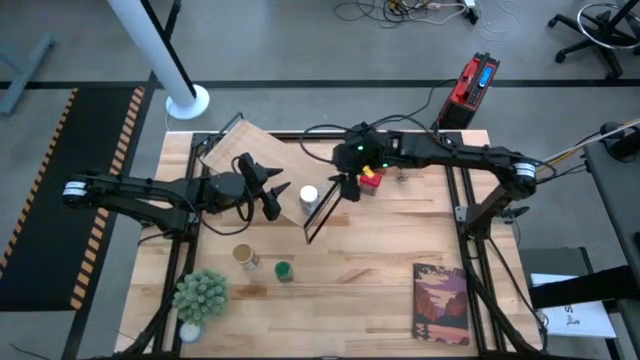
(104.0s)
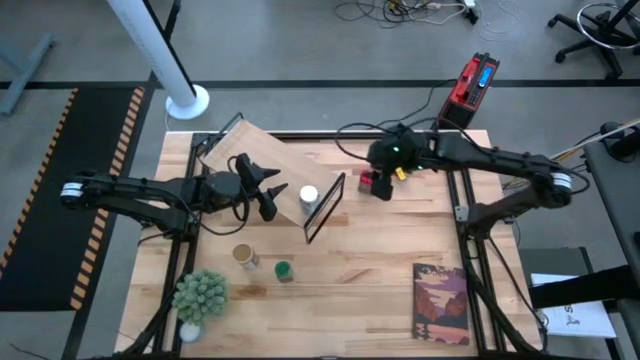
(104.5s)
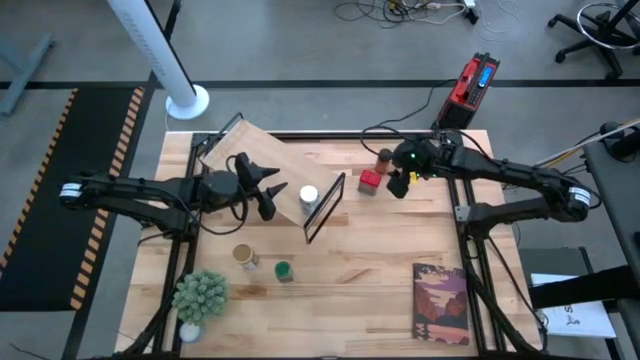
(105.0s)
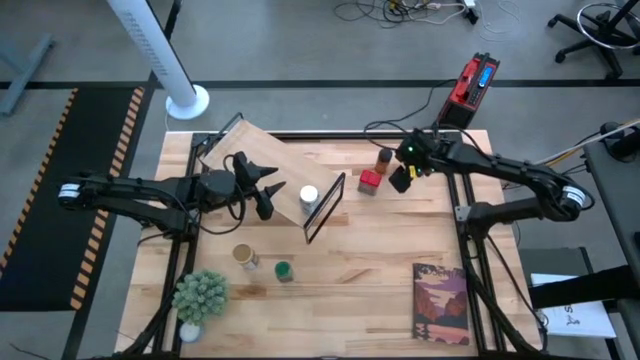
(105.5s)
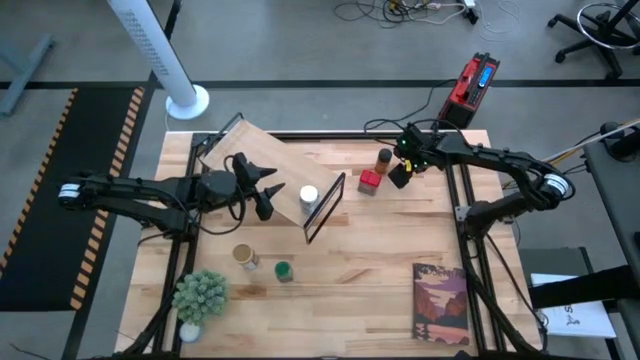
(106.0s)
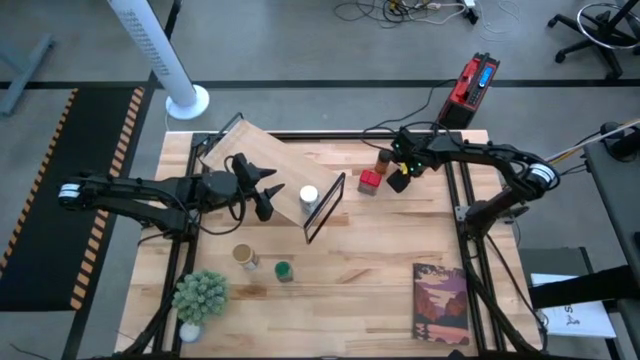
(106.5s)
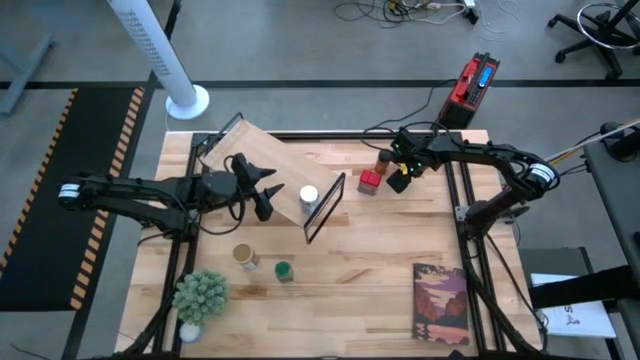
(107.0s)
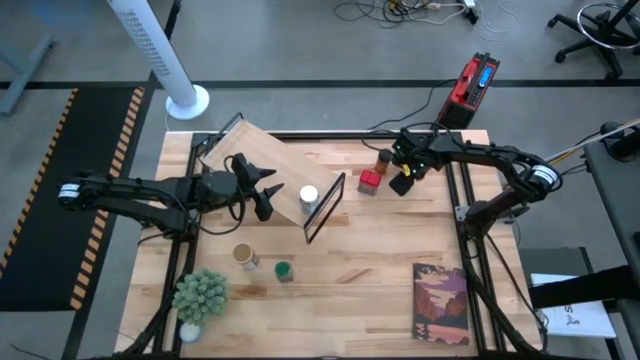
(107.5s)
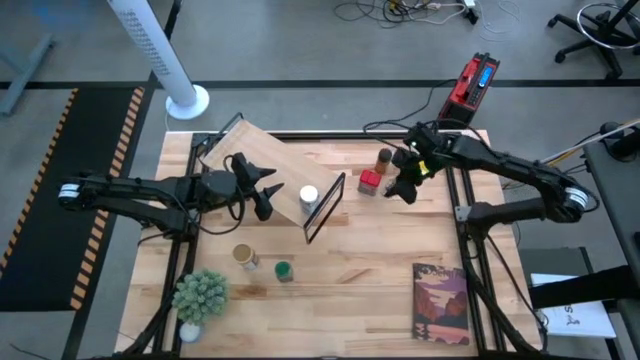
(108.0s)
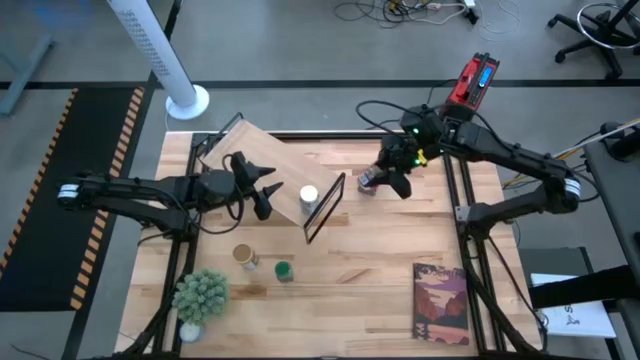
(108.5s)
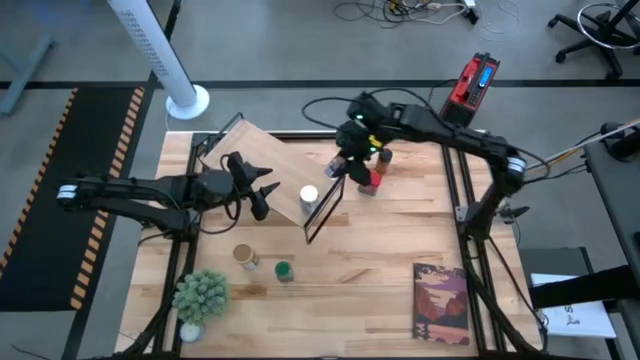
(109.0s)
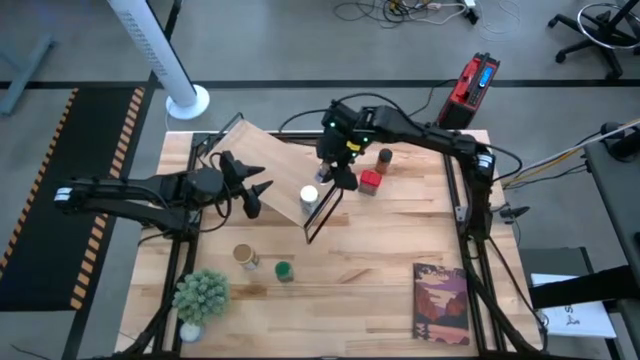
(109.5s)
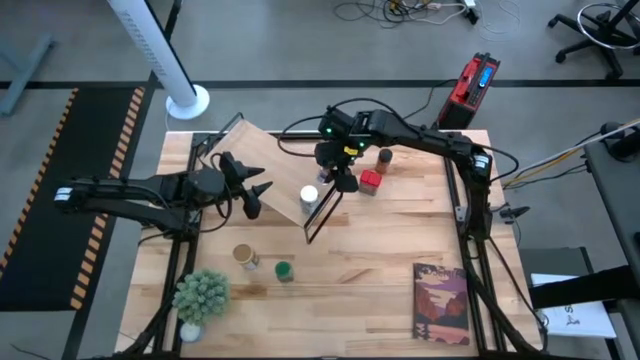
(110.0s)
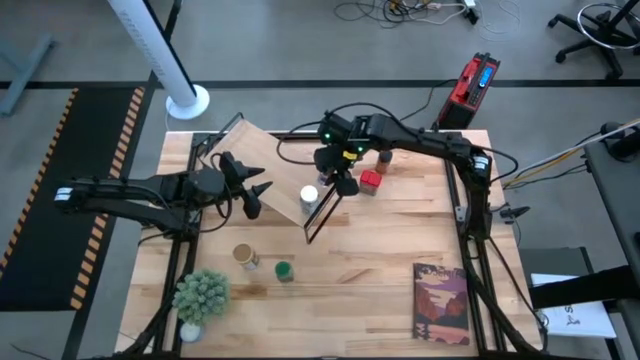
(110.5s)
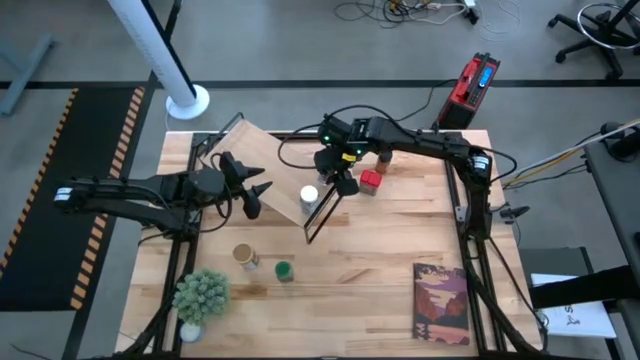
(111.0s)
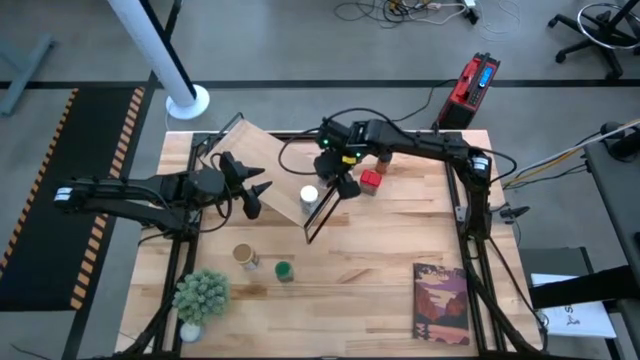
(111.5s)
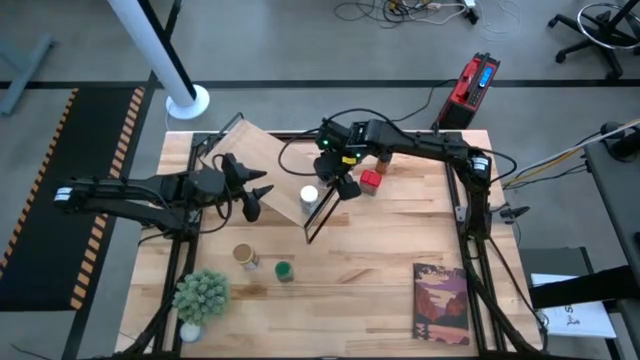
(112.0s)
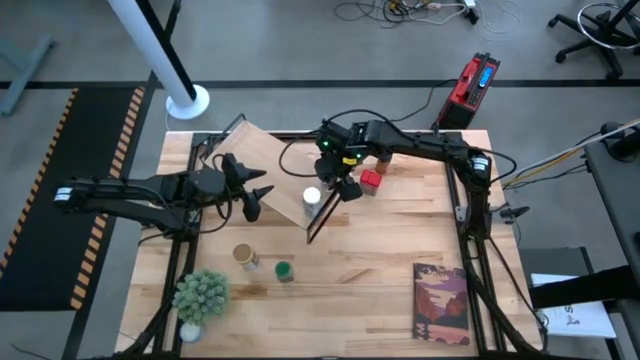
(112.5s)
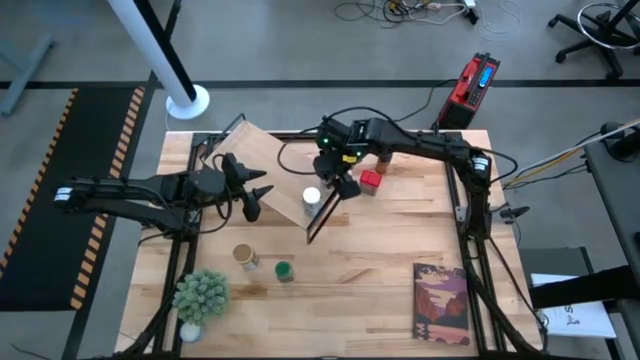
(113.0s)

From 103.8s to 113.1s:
Task: Shelf spices
Put the brown seasoning bottle on the shelf

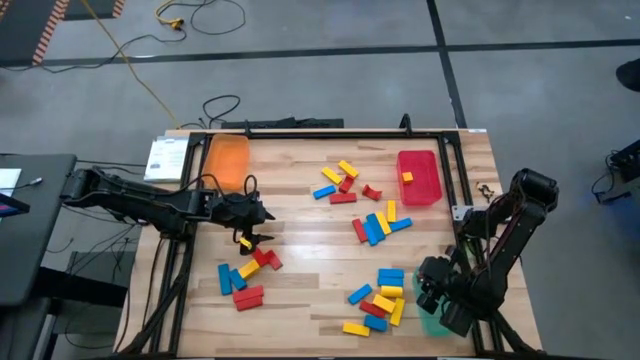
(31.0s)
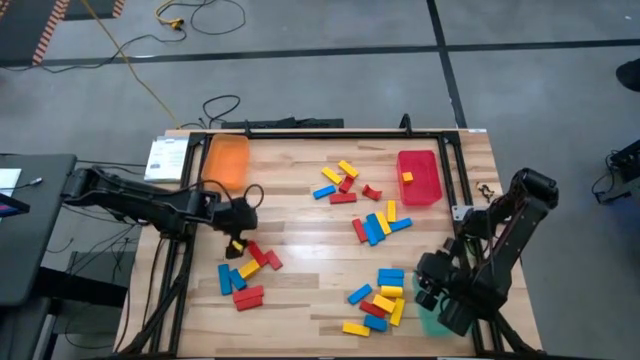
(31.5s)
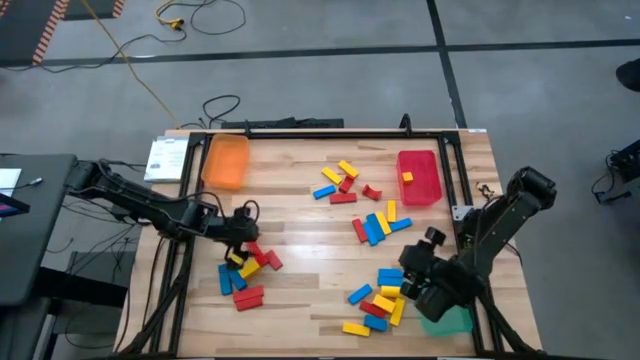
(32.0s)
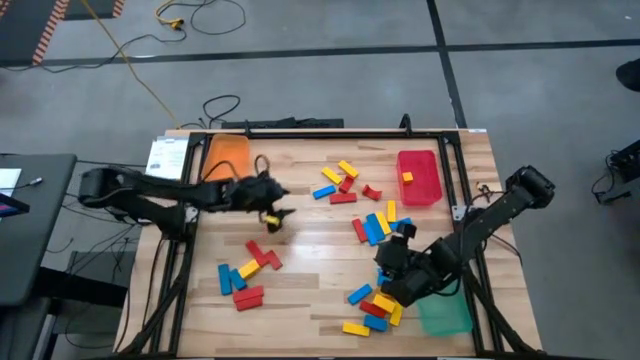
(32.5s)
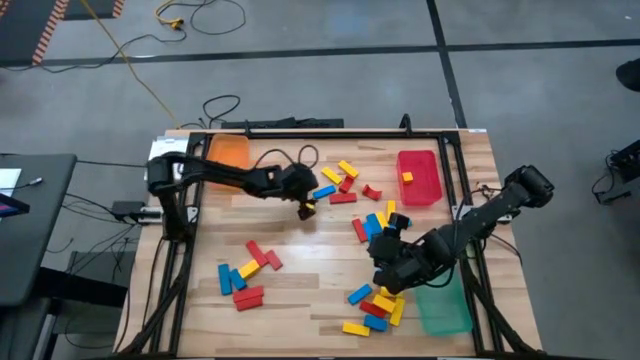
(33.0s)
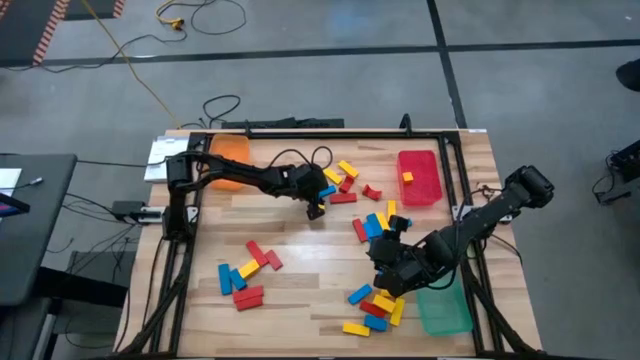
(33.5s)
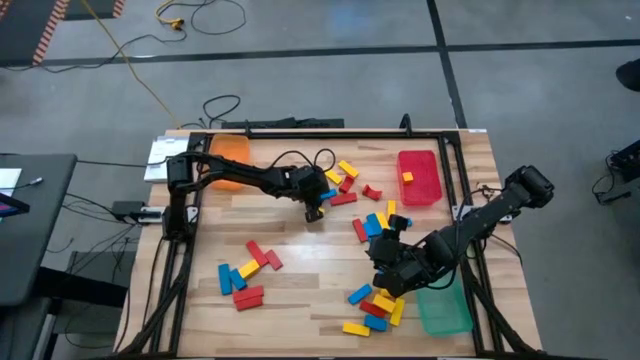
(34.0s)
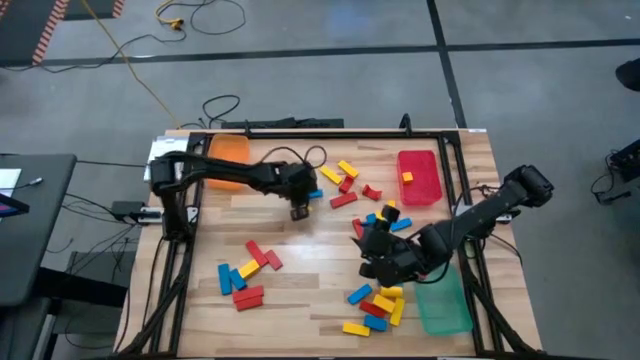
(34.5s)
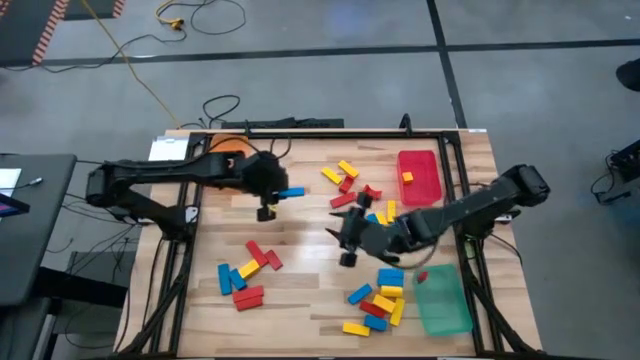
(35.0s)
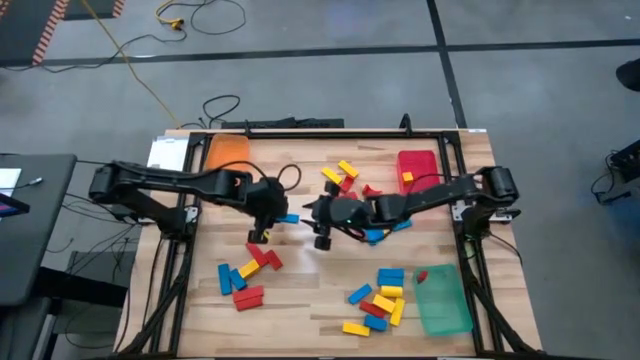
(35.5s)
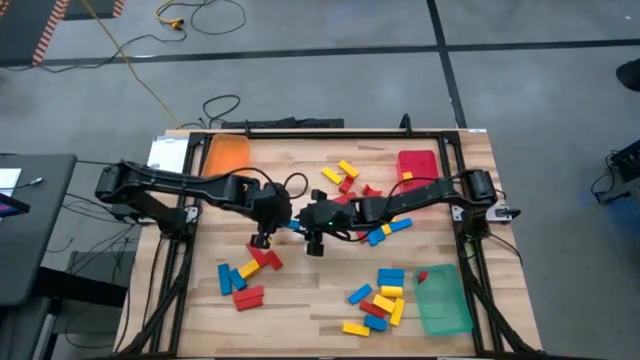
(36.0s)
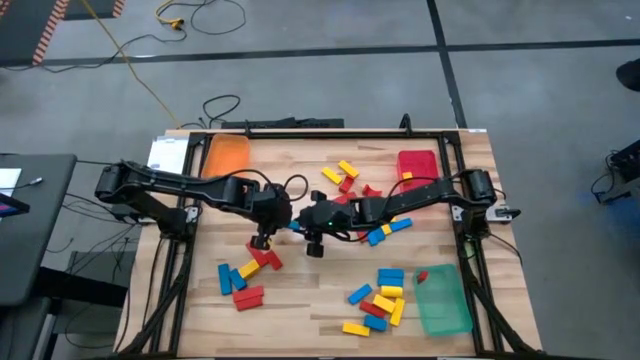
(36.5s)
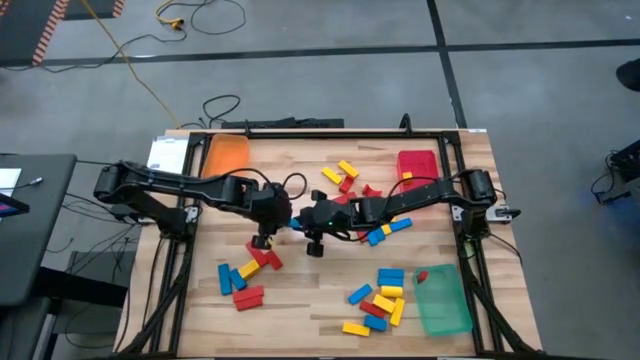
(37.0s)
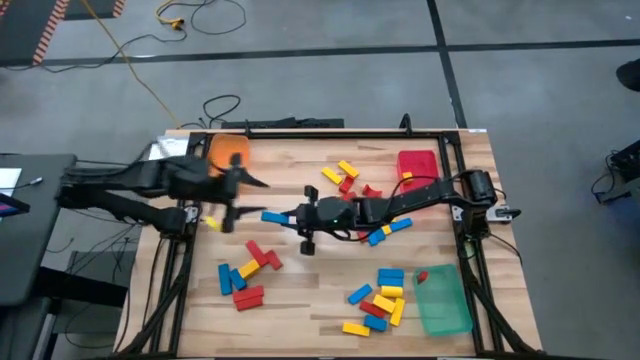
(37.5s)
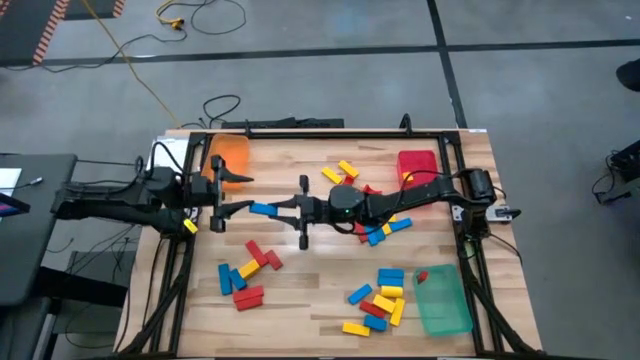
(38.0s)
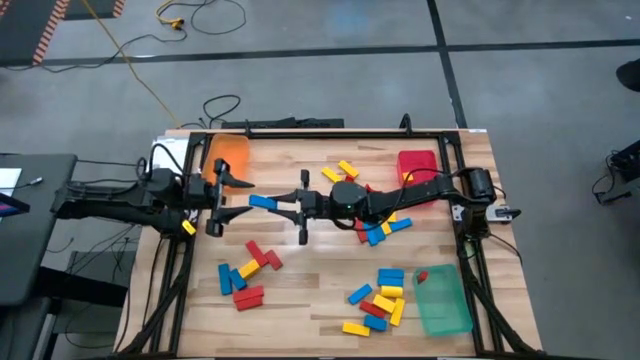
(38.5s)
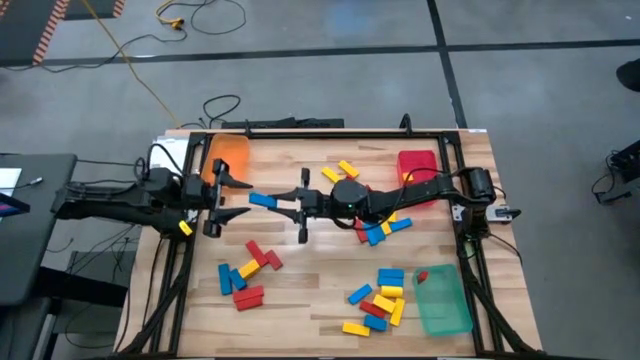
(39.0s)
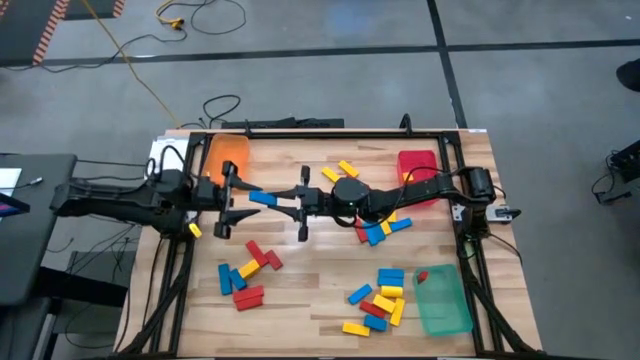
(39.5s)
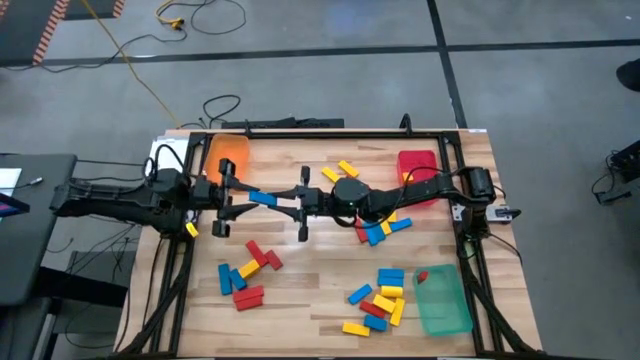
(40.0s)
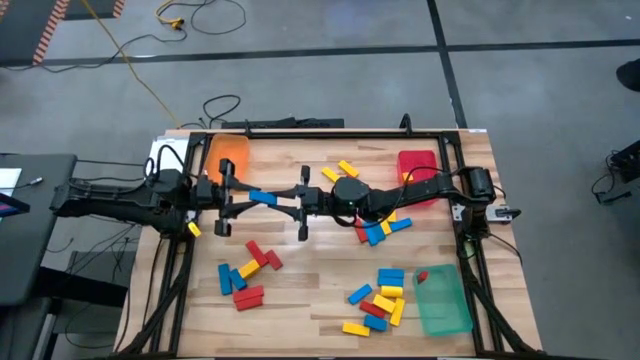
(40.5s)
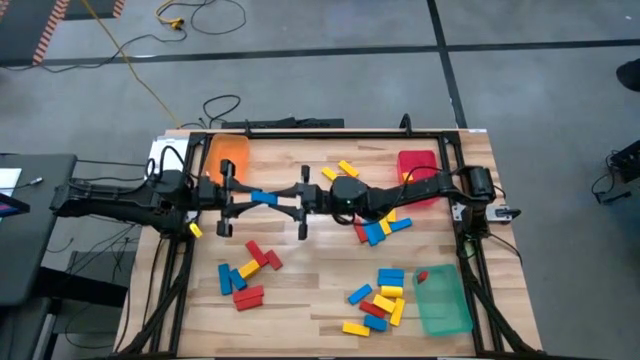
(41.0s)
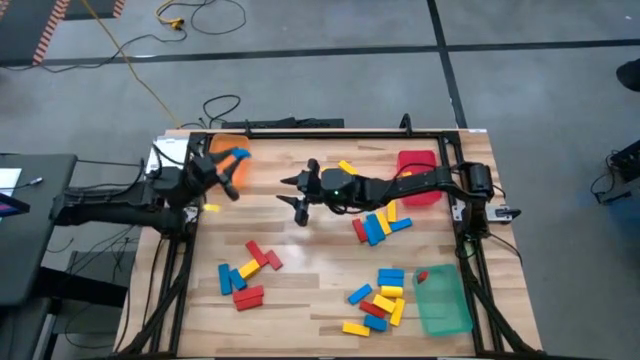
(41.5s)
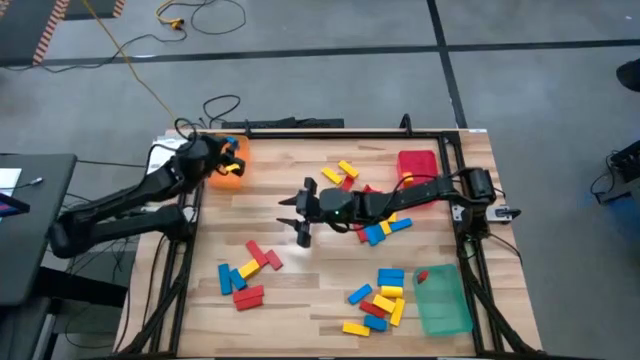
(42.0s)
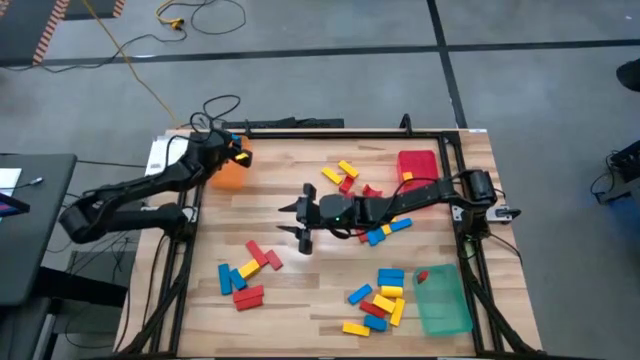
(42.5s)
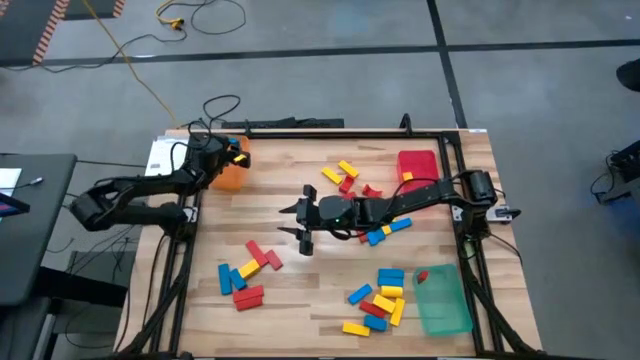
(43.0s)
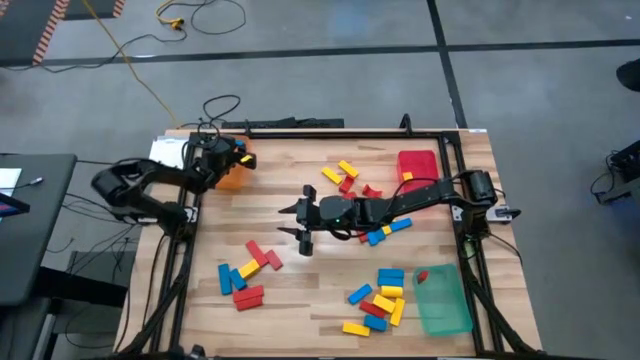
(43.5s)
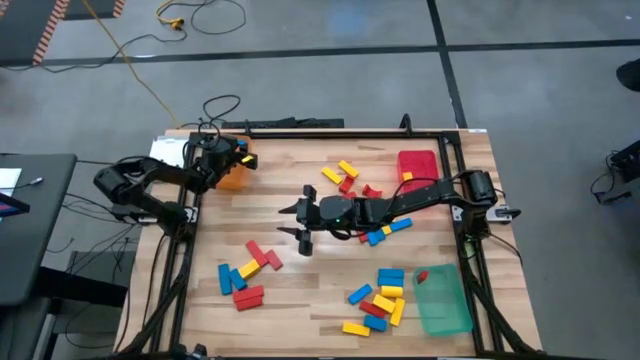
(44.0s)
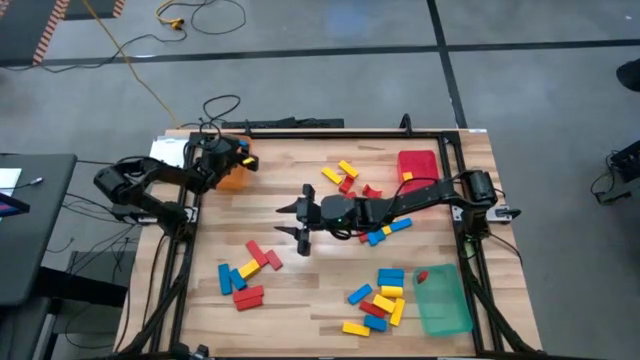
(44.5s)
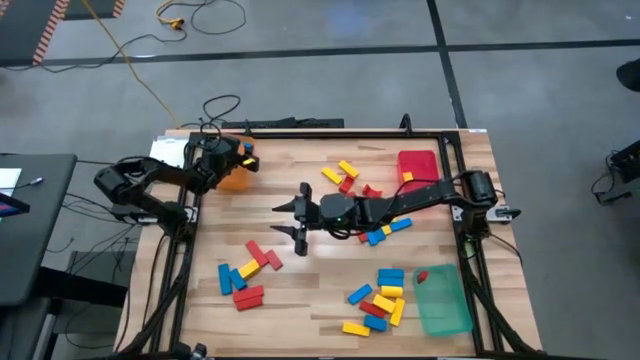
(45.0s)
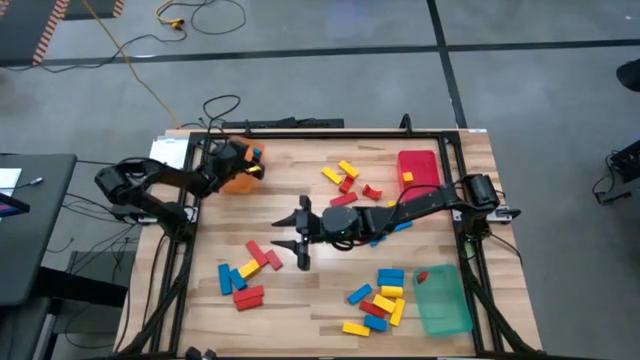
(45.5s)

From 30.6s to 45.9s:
Task: Sort blocks
Put the blue rectangle block into the orange bin
